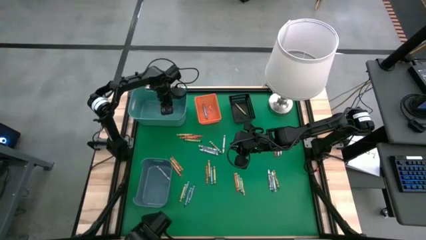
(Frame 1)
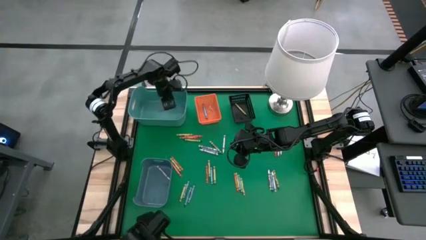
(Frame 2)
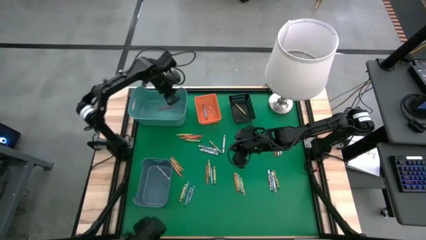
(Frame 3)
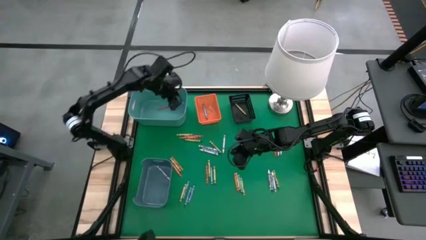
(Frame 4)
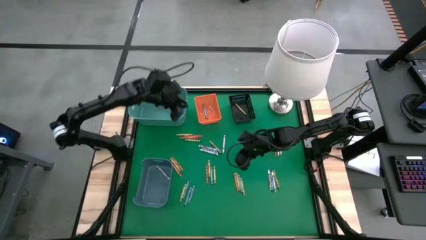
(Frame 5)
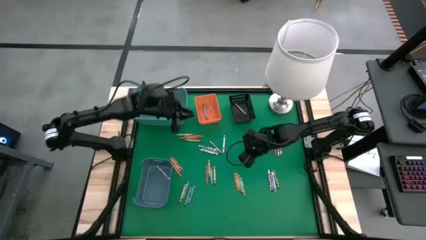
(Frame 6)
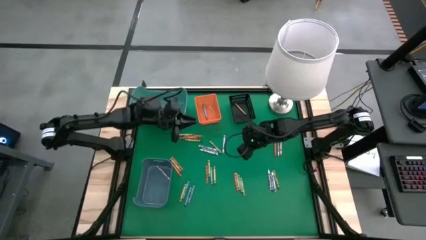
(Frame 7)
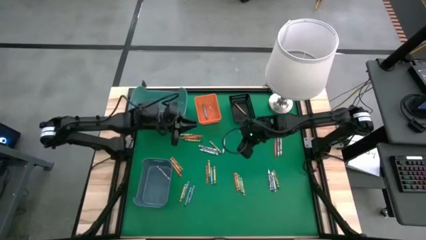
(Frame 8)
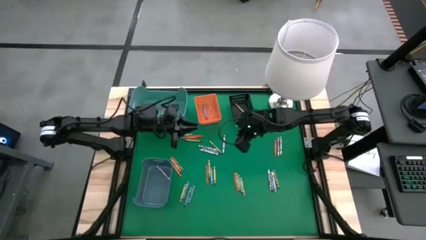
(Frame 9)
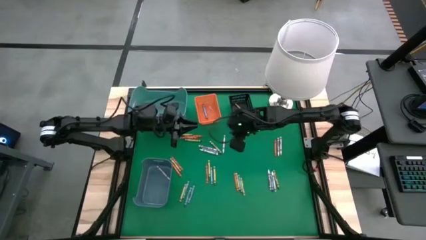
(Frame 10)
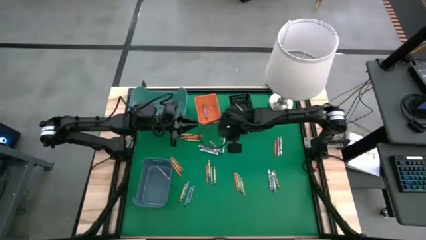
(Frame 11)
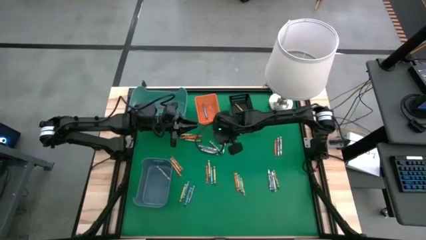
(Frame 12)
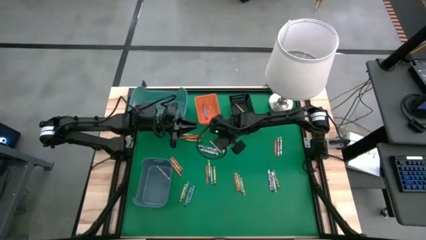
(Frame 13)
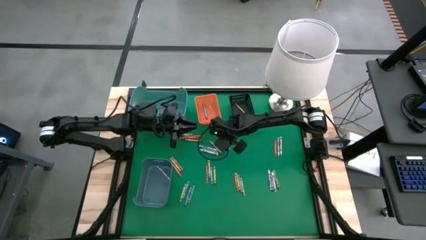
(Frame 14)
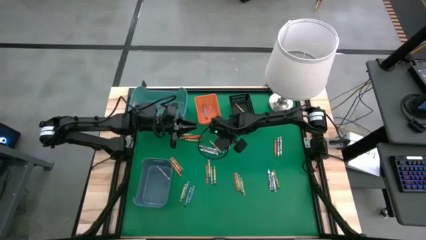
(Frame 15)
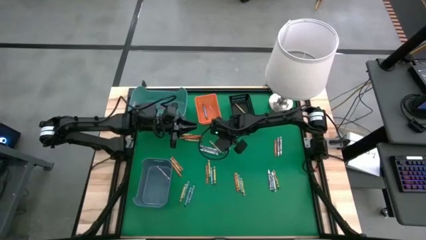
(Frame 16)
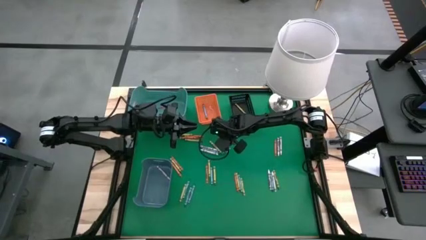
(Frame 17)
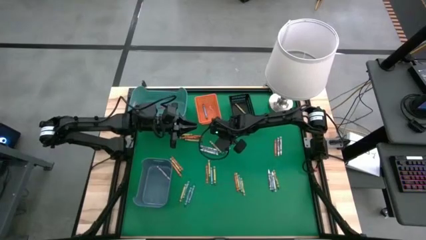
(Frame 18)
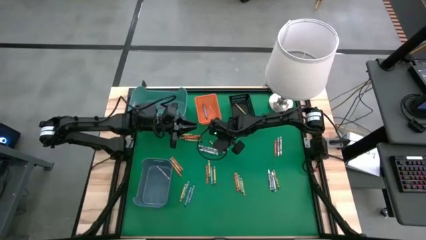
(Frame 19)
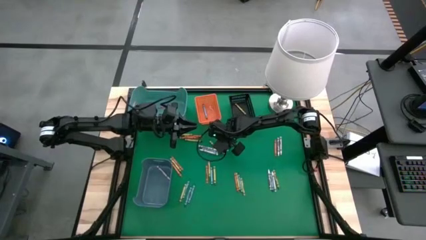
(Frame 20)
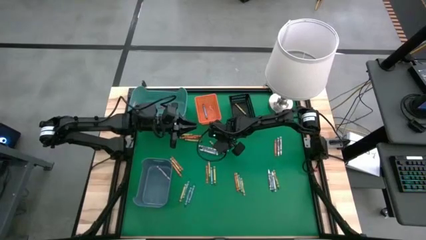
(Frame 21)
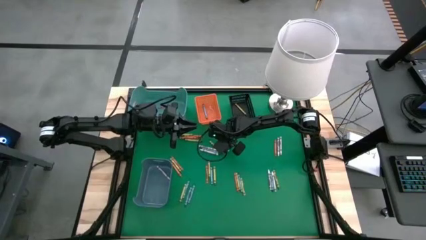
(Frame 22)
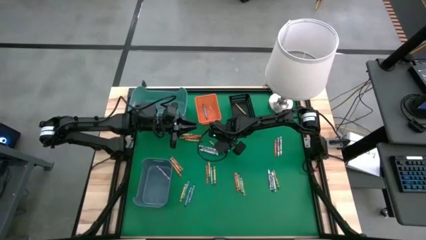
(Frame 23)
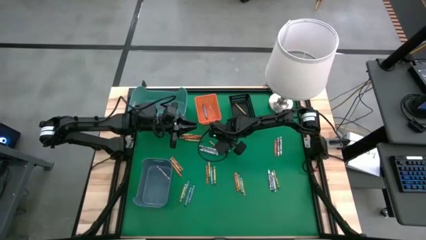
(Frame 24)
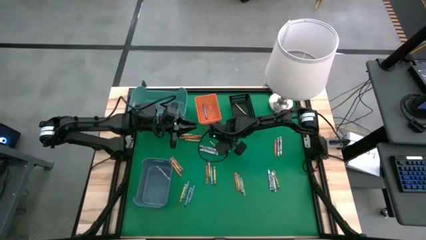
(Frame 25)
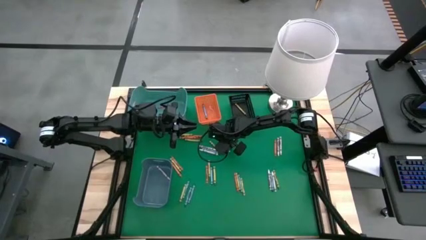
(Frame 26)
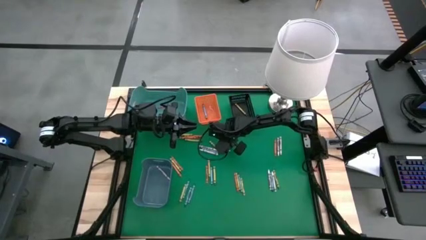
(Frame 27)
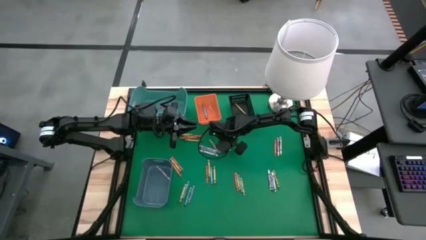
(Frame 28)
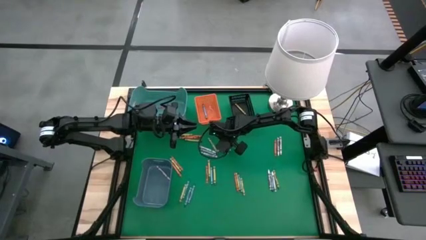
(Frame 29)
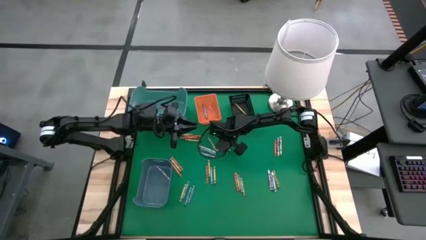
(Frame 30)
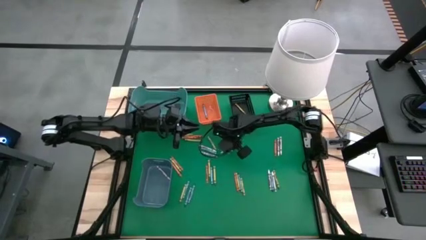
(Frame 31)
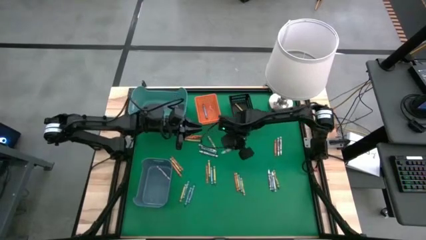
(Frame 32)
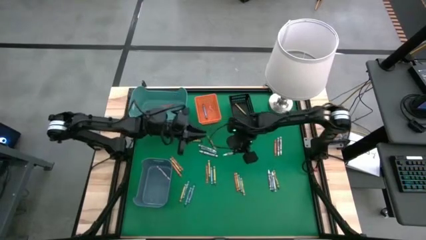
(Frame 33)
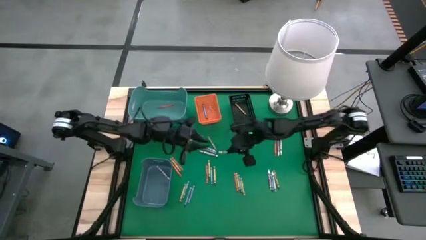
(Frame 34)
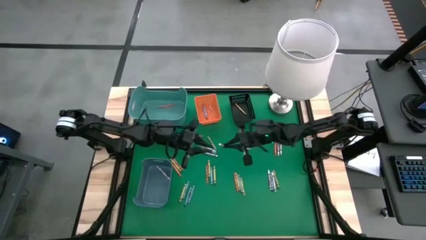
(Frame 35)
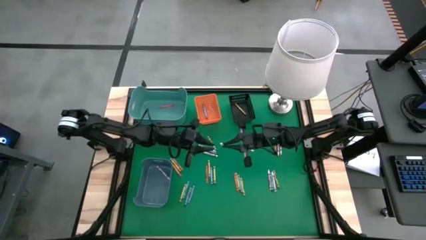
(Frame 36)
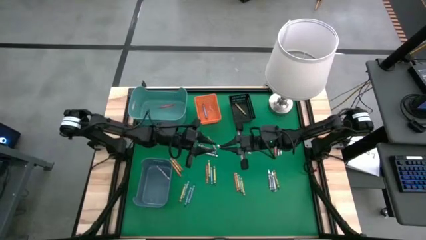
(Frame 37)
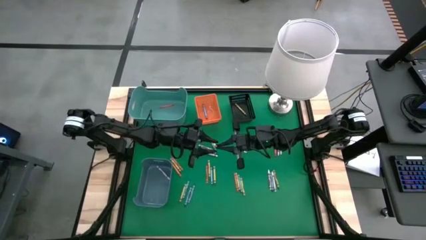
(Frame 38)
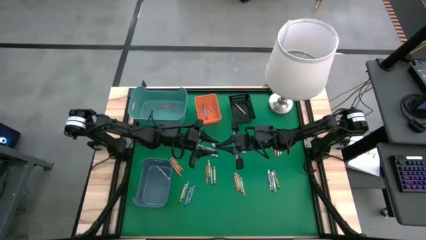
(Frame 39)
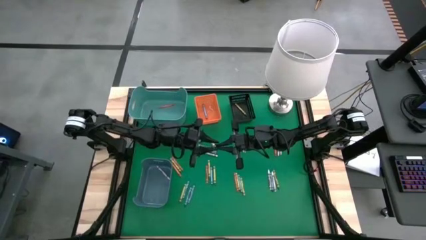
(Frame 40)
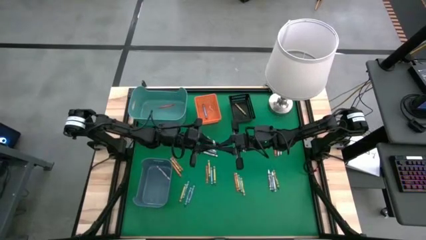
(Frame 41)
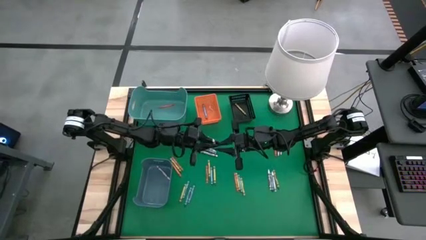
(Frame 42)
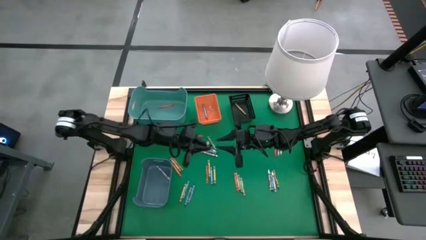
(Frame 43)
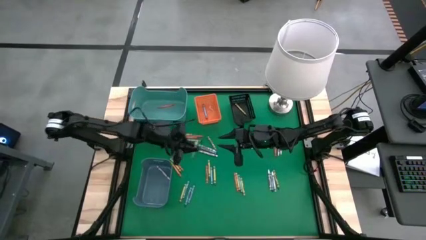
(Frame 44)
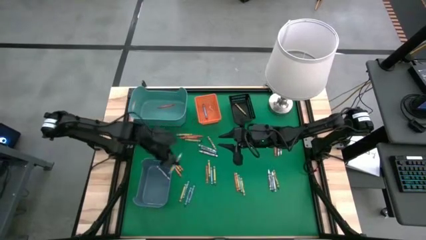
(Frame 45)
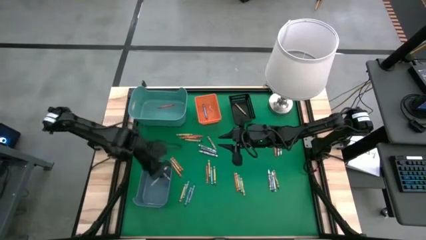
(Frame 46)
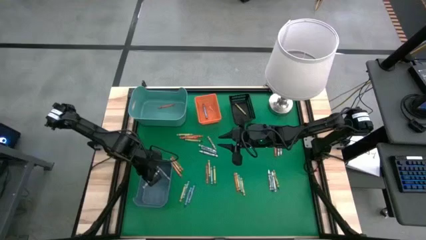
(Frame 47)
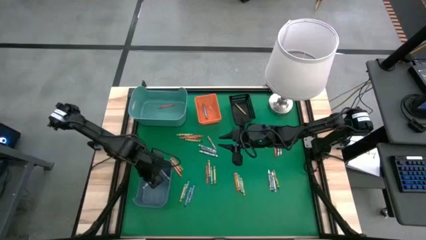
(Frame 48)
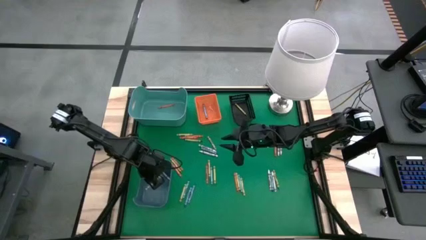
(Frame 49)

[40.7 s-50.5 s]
Task: Sort crayons
Put the white crayon into the blue bin

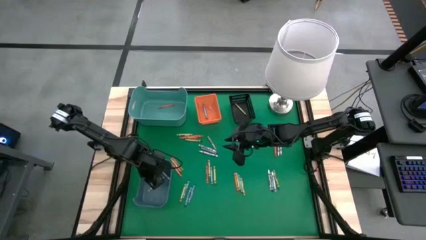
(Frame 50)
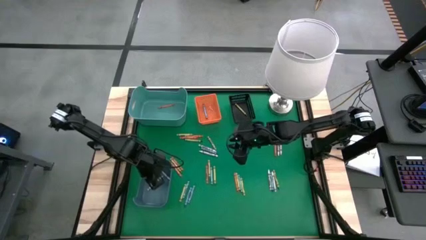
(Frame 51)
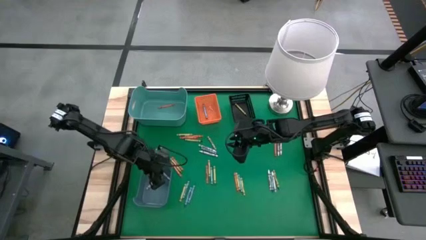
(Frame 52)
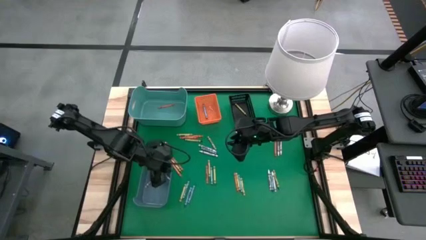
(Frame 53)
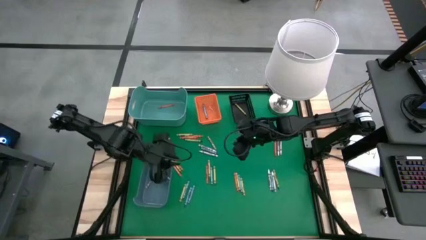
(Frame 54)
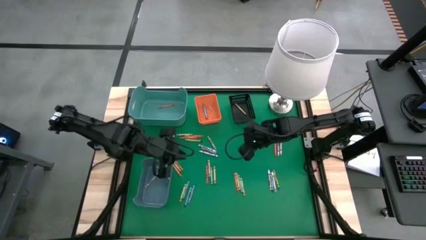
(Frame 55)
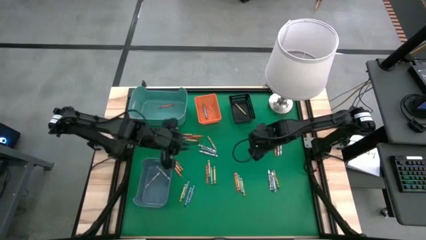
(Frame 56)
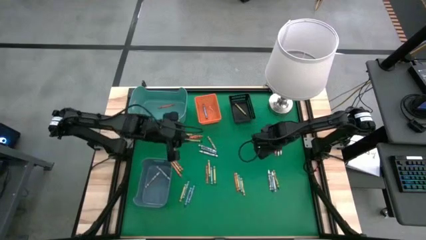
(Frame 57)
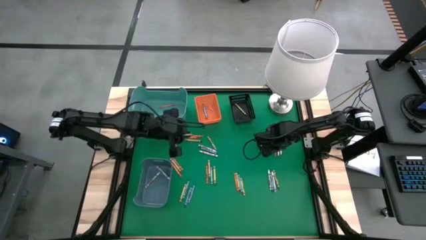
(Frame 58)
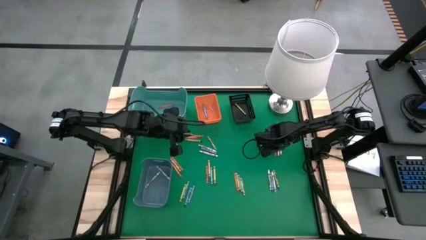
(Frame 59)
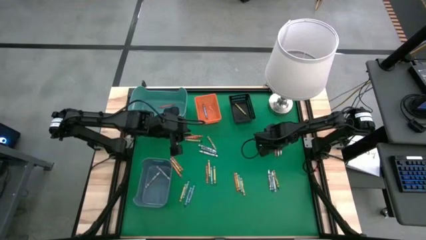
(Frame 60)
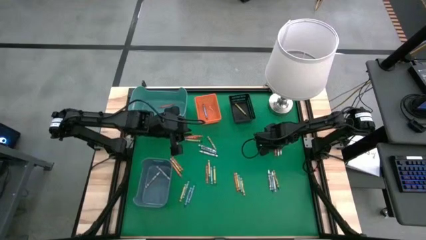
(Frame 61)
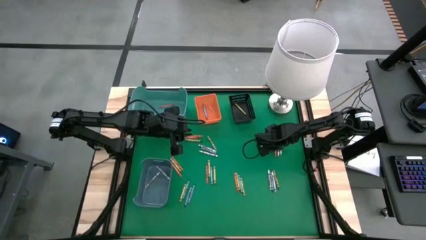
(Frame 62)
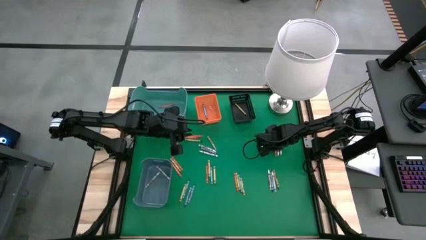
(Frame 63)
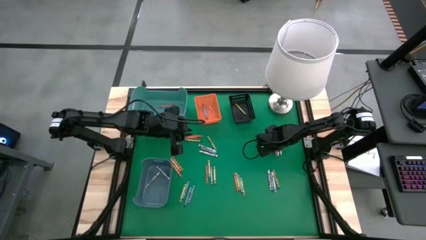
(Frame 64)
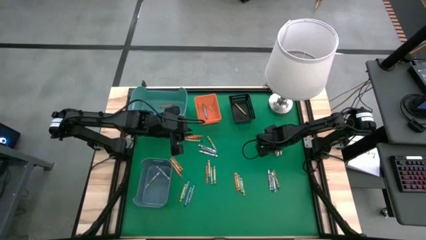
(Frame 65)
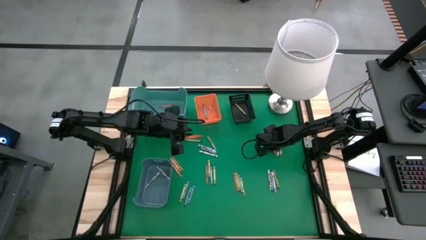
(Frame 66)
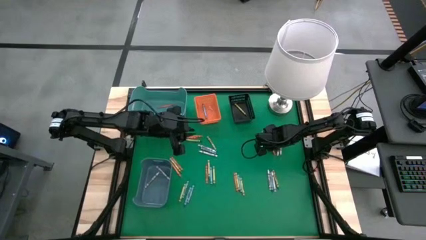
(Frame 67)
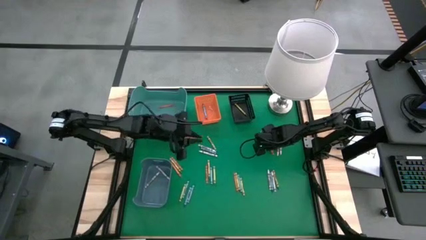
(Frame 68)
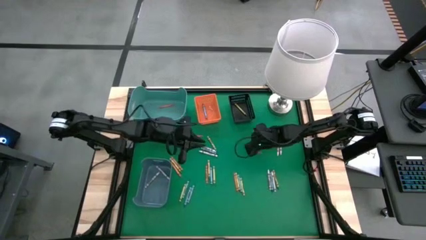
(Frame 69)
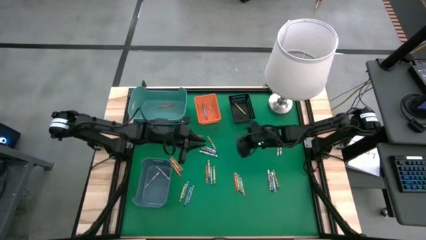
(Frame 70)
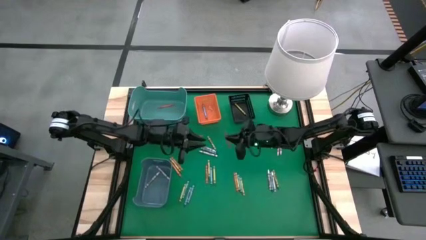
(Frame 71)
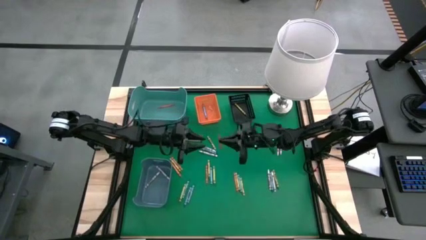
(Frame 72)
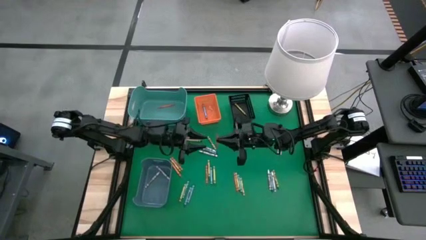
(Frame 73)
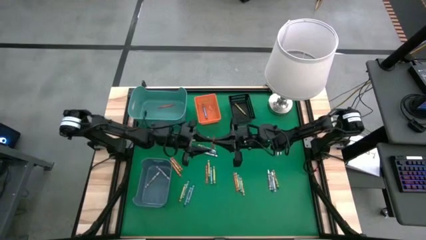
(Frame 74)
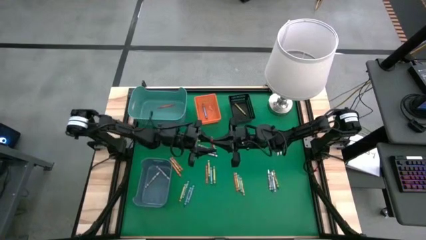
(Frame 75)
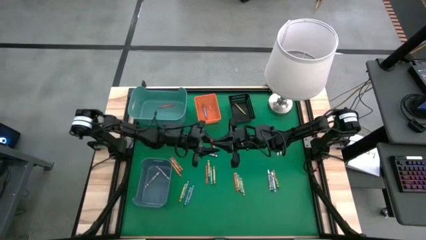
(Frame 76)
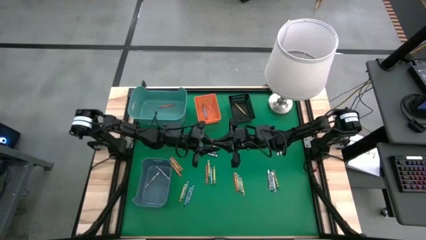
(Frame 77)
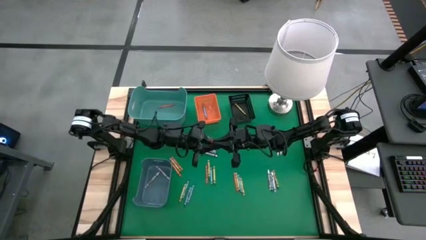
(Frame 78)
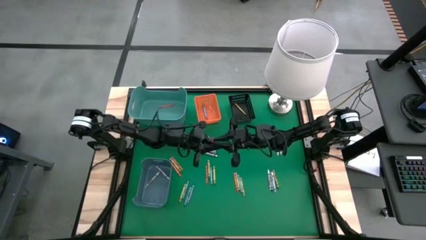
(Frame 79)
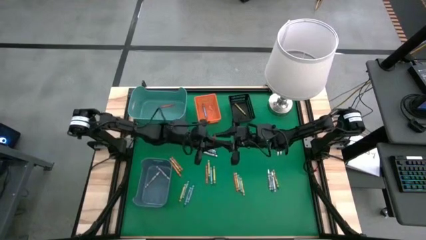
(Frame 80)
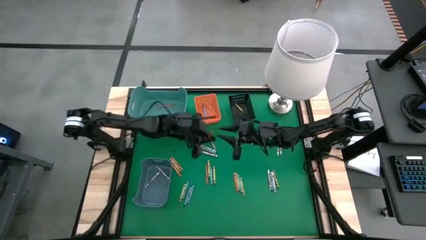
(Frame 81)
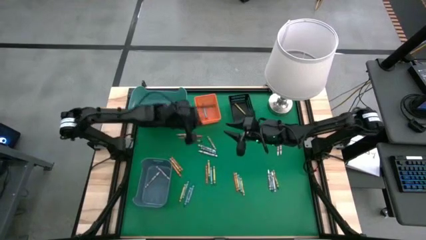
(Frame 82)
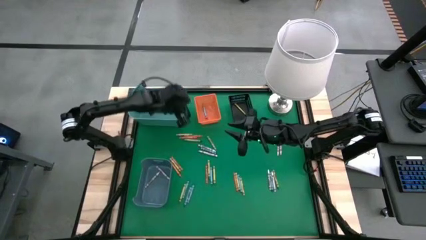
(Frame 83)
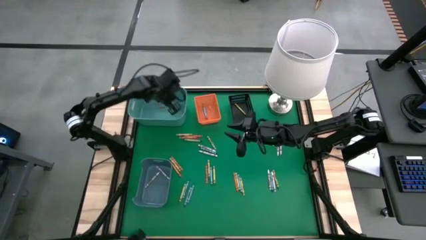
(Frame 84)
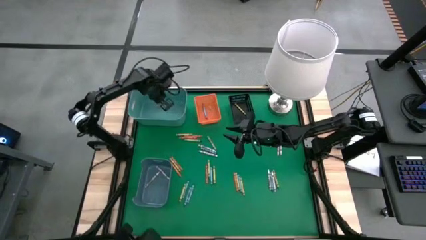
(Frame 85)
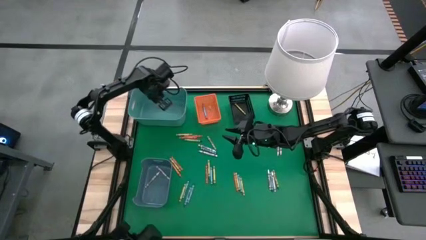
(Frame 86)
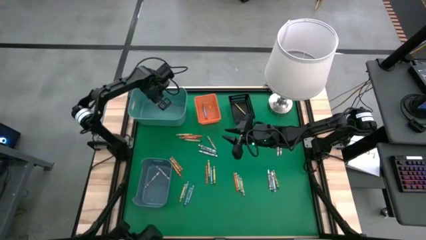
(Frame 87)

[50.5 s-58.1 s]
Put the orange crayon into the green bin
